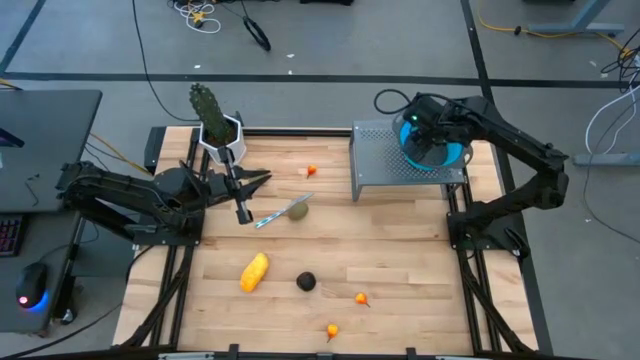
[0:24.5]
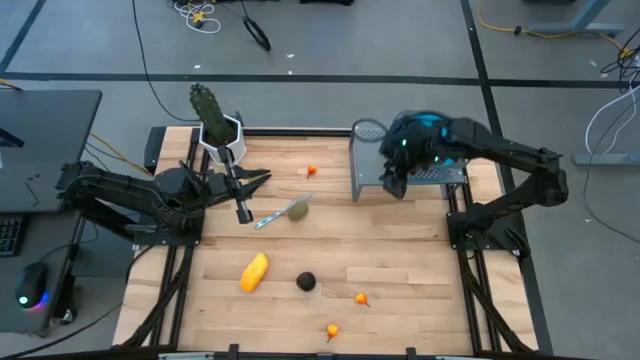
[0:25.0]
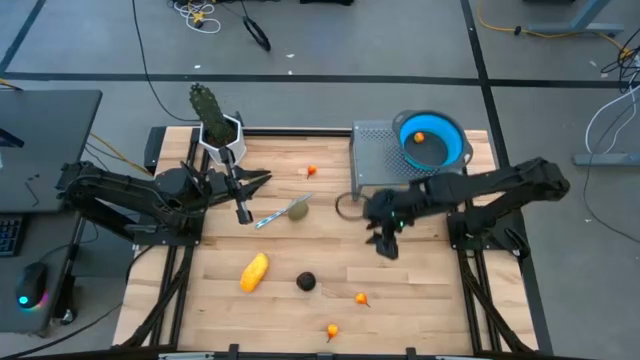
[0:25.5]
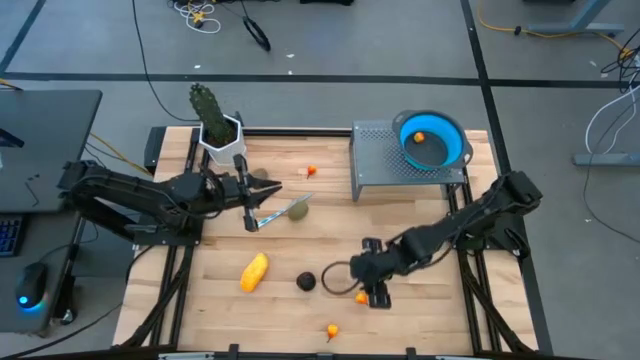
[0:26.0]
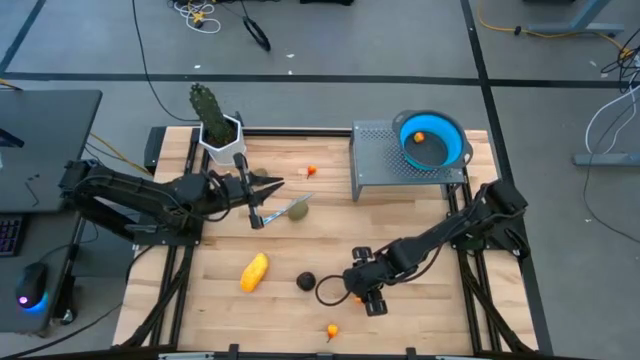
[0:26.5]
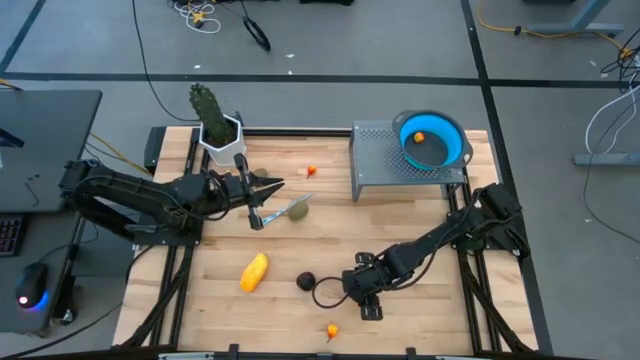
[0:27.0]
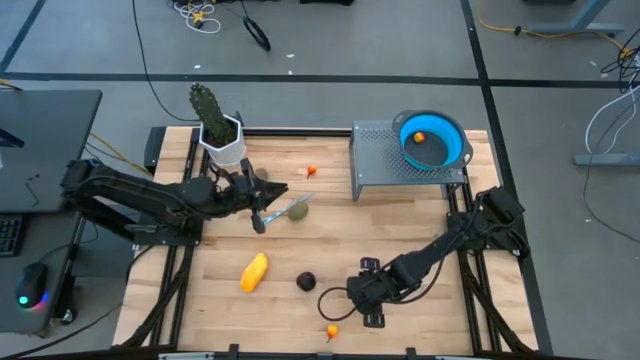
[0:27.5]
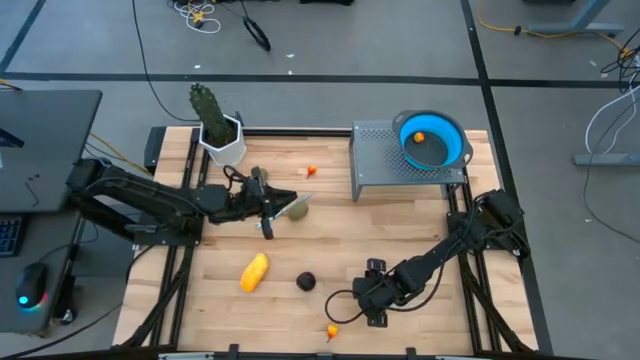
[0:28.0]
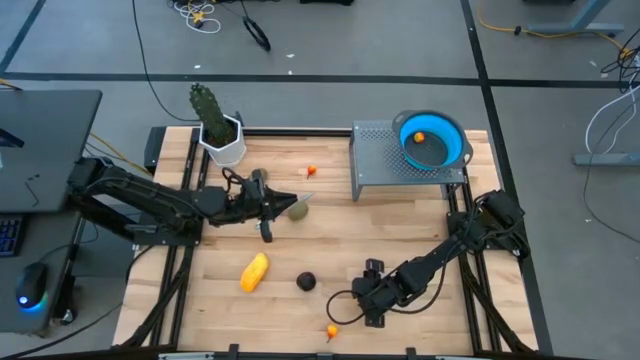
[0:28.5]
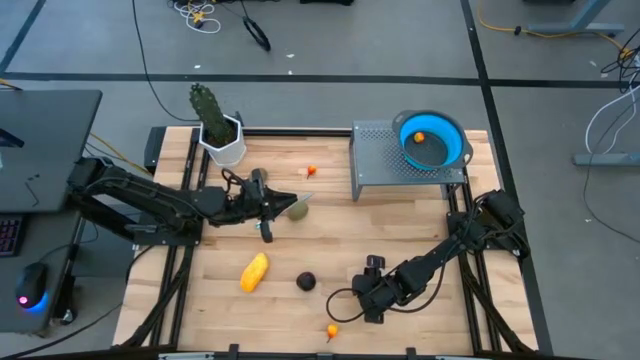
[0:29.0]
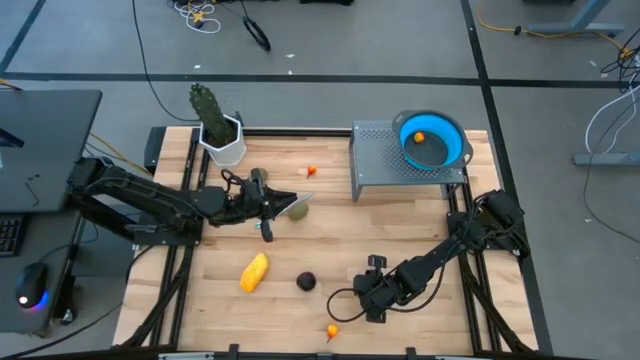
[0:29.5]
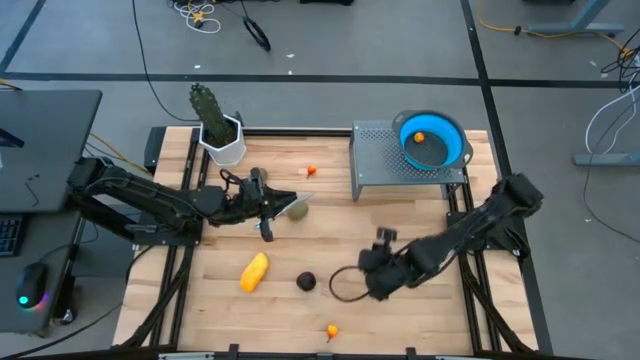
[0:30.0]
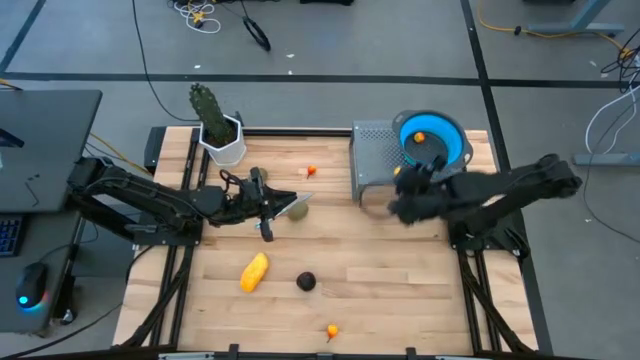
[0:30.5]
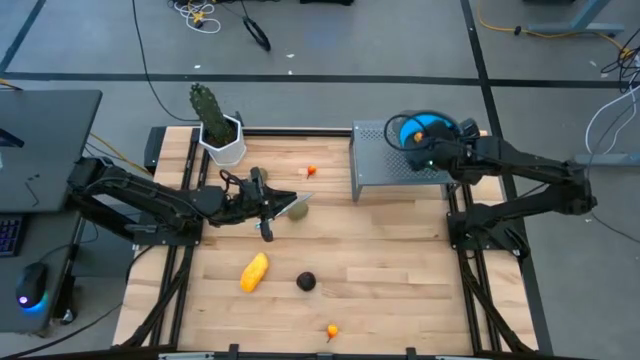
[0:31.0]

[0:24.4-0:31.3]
Task: Pick & Place Fruit
Put the pear into the blue strainer bowl on the shelf

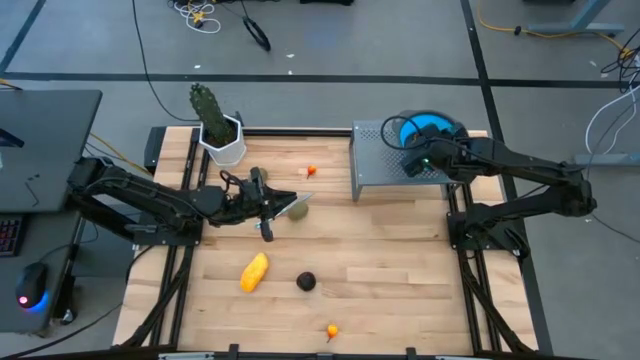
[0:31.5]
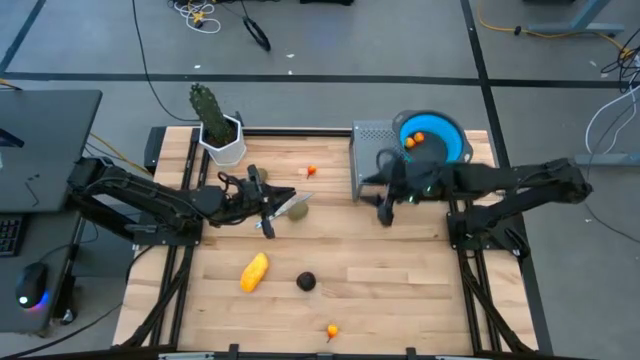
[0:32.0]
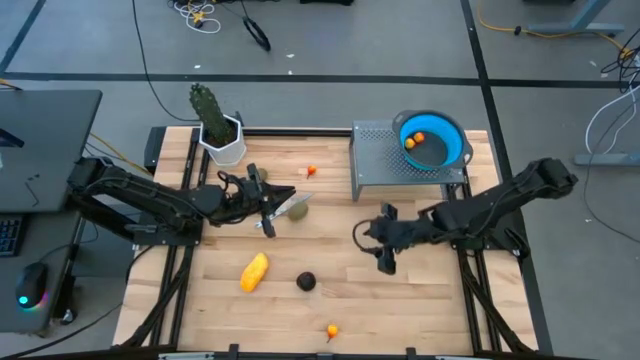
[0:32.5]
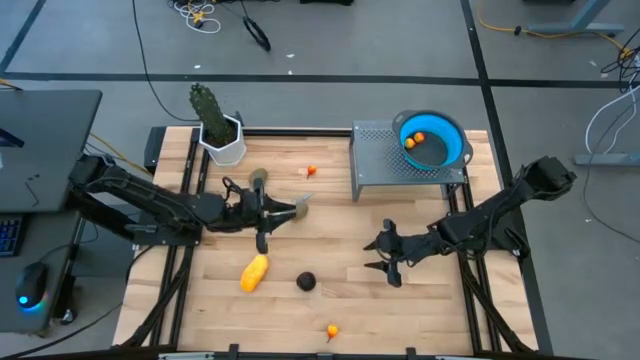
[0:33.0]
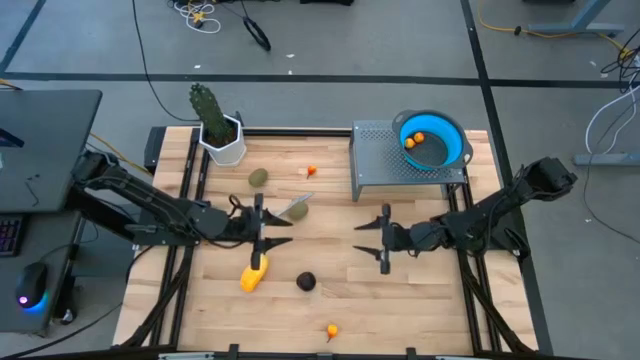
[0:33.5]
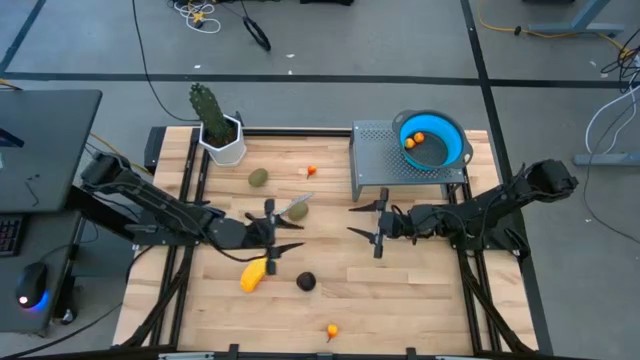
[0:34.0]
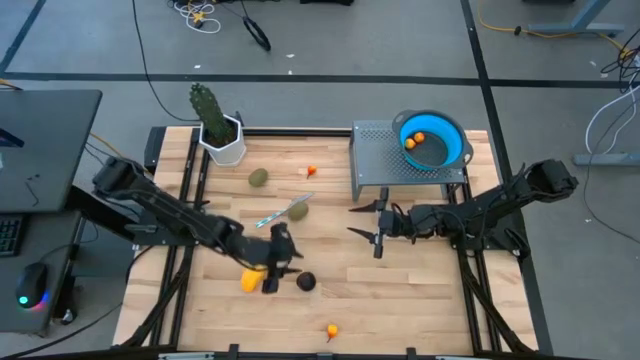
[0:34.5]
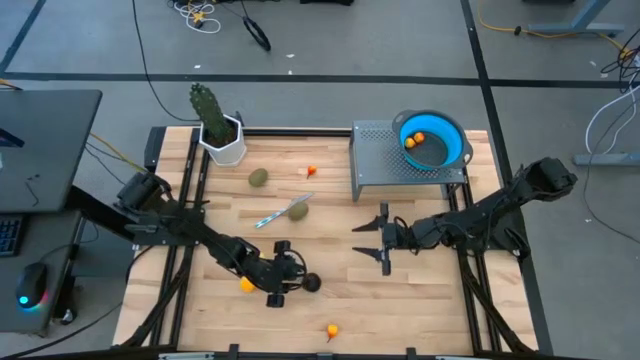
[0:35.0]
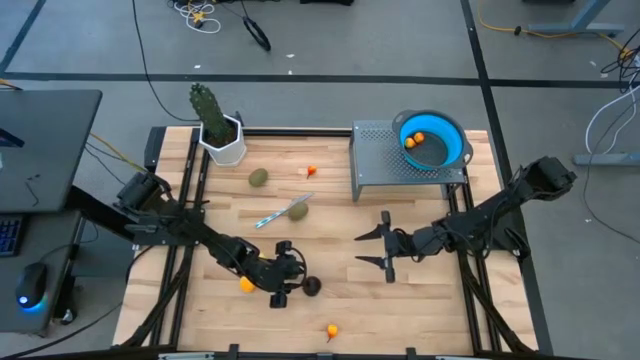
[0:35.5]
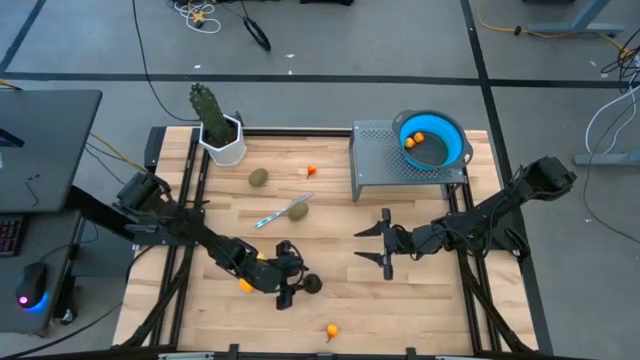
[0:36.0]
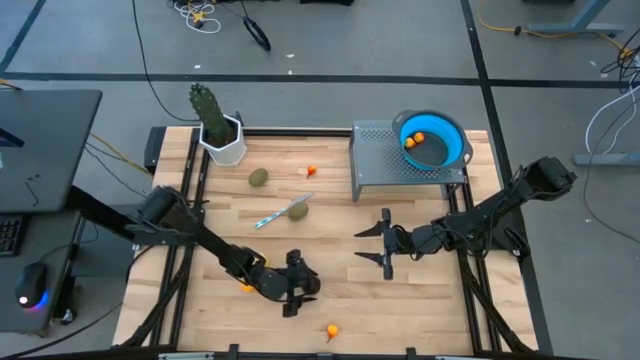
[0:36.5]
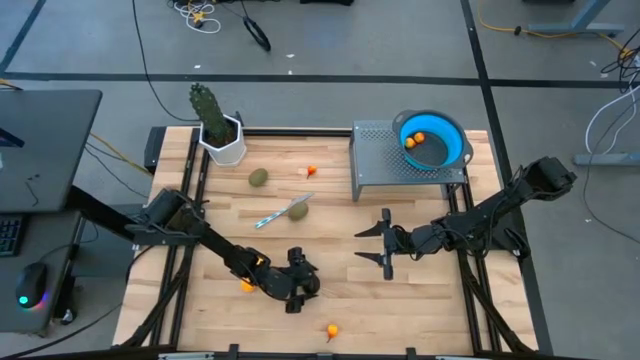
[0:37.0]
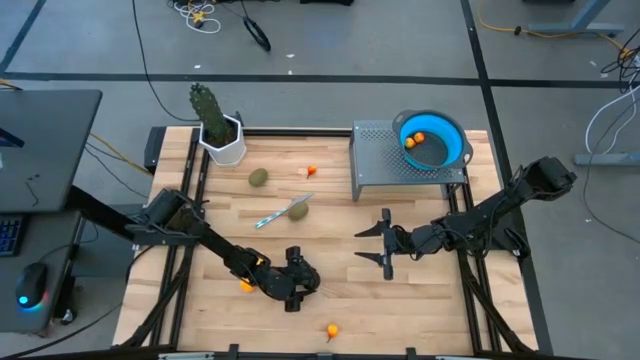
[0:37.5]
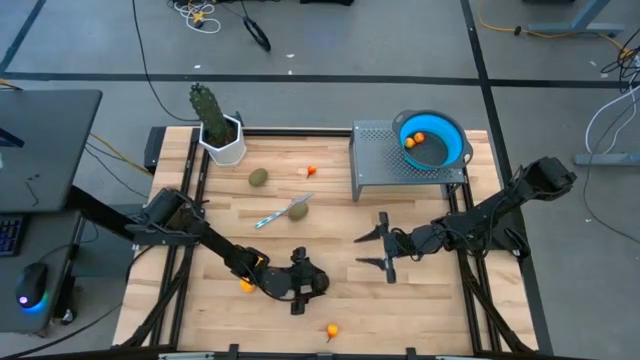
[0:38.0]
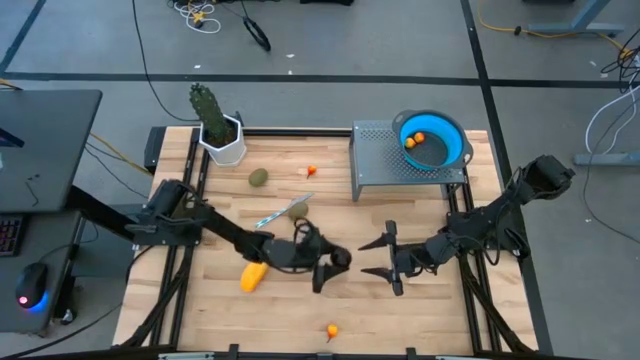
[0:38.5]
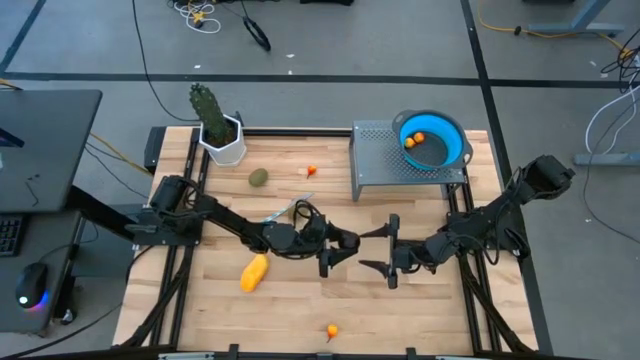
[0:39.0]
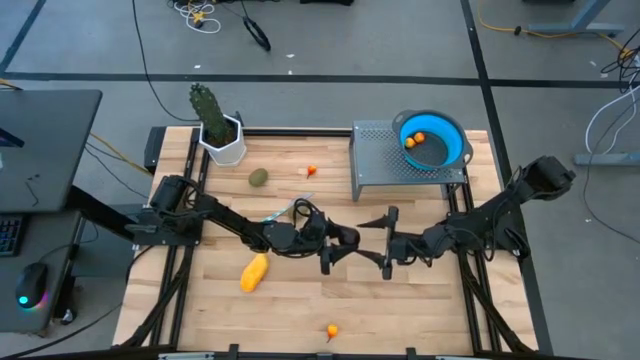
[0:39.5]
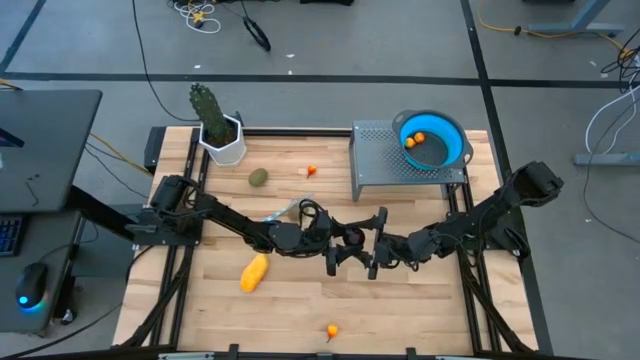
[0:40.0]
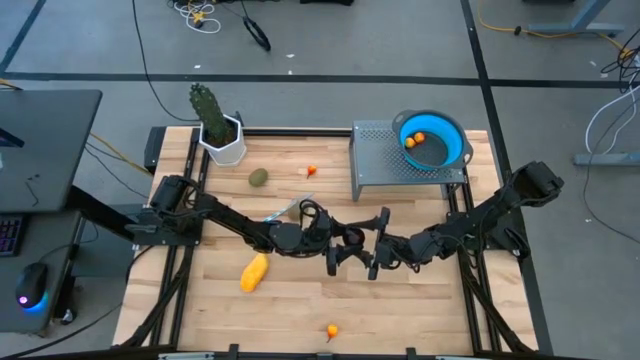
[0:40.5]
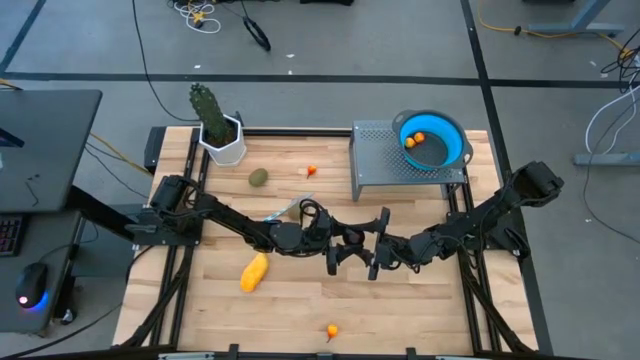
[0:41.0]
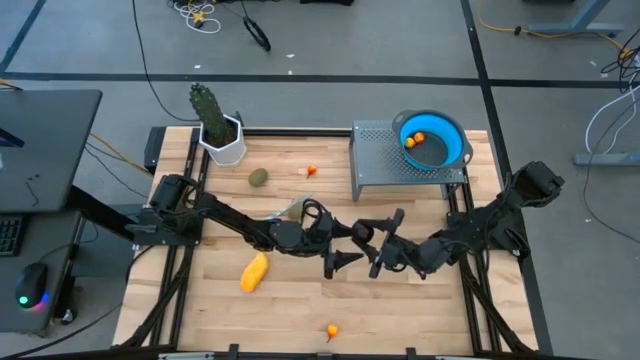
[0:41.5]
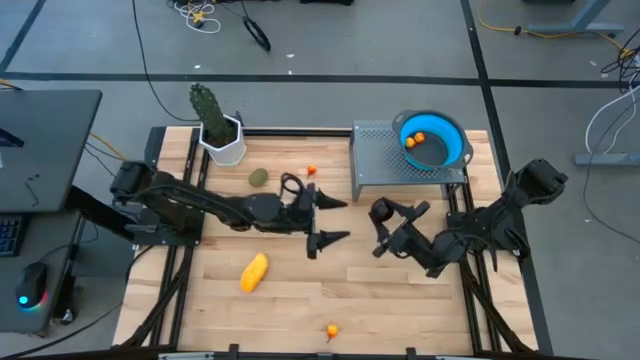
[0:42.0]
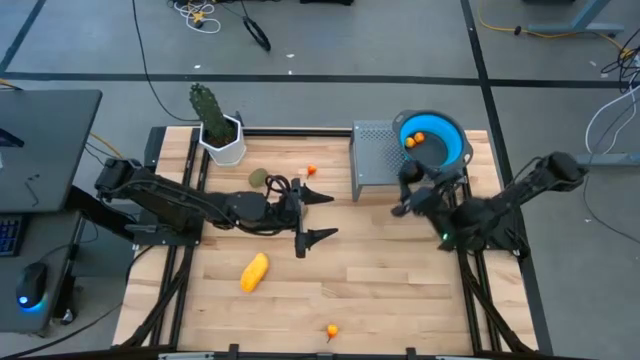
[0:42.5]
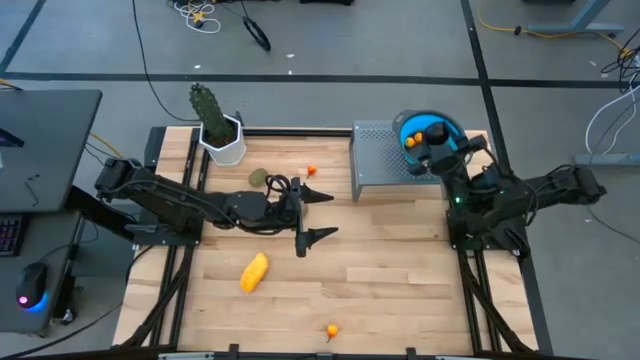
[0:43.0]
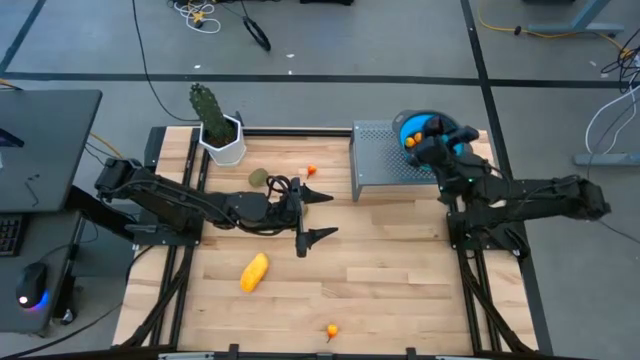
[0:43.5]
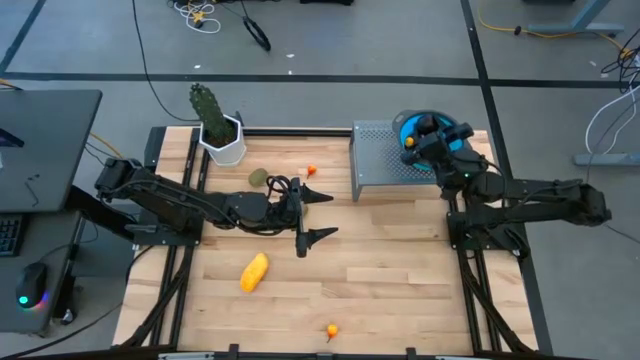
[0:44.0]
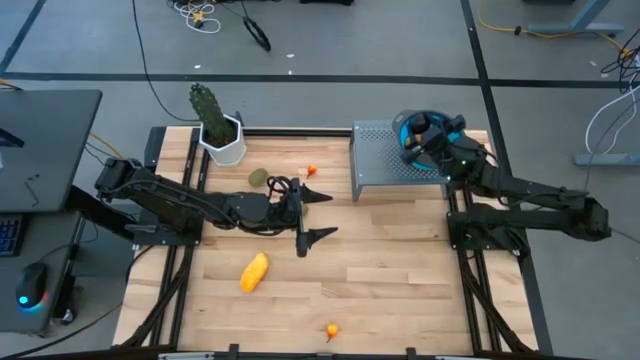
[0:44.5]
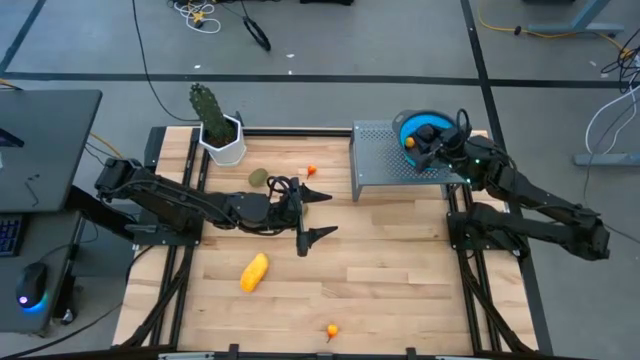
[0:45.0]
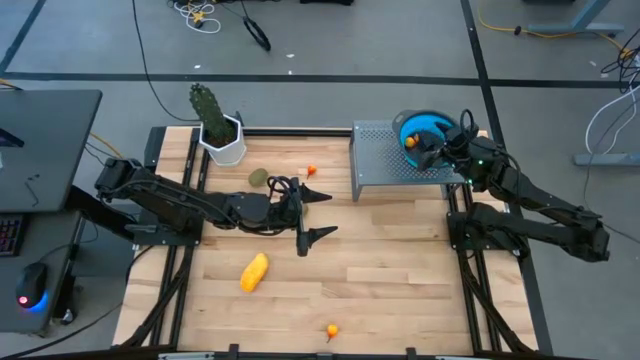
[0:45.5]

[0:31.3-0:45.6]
Put the plum into the blue strainer bowl on the shelf
